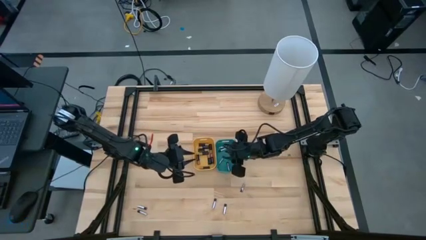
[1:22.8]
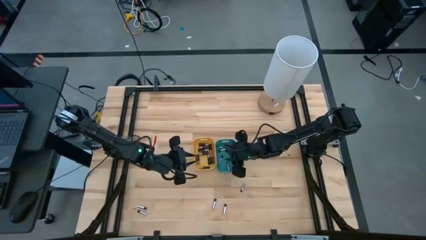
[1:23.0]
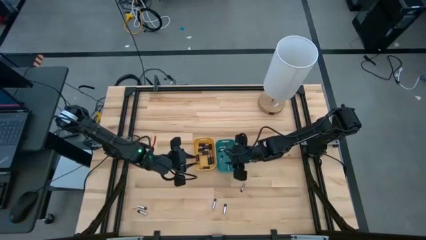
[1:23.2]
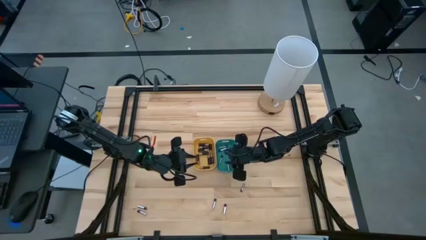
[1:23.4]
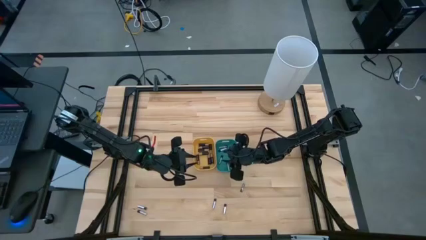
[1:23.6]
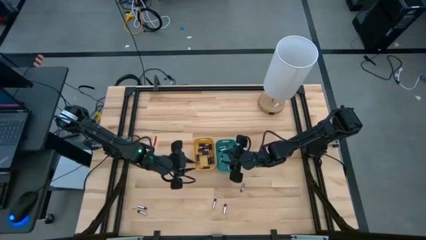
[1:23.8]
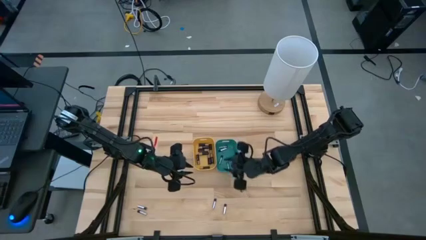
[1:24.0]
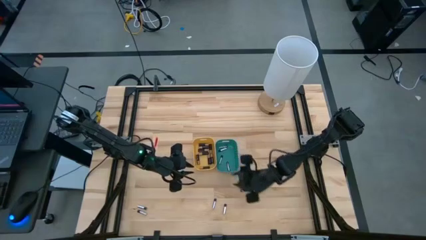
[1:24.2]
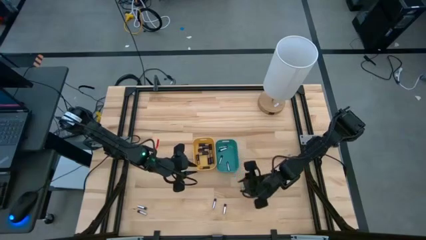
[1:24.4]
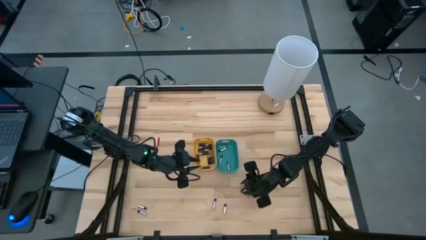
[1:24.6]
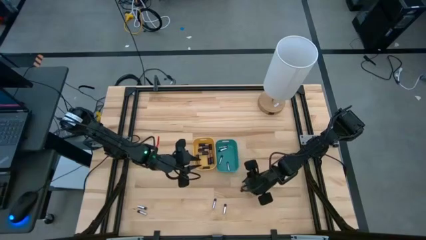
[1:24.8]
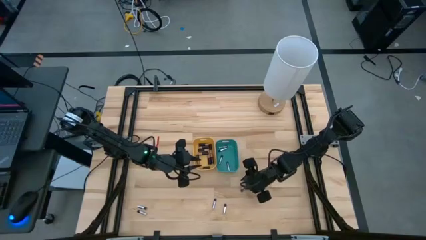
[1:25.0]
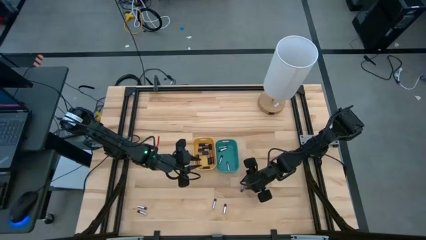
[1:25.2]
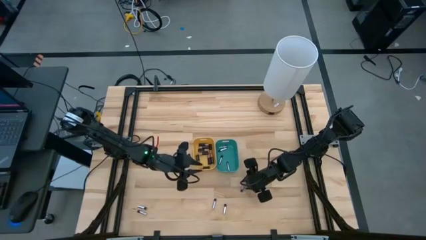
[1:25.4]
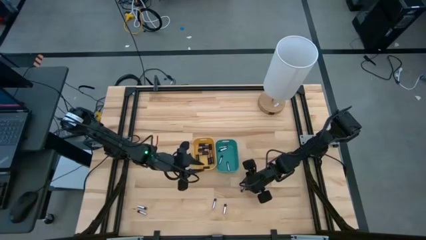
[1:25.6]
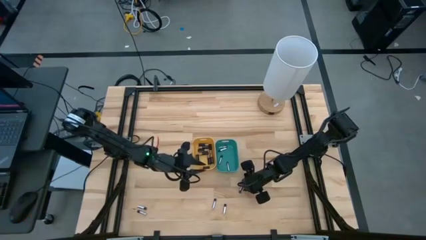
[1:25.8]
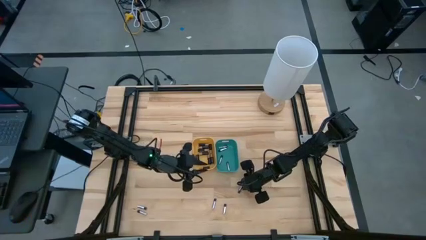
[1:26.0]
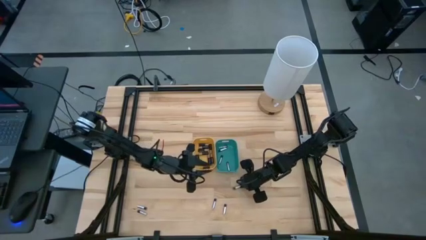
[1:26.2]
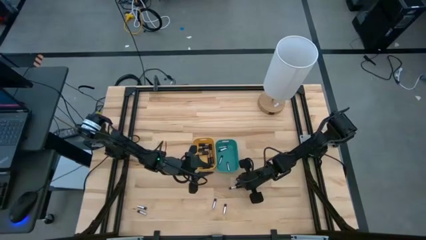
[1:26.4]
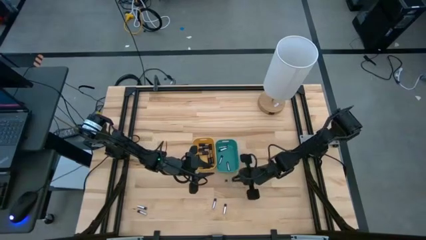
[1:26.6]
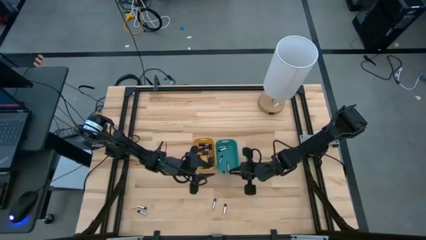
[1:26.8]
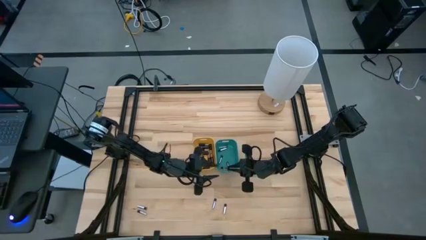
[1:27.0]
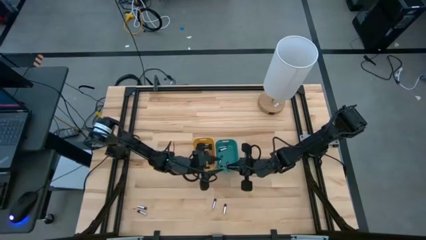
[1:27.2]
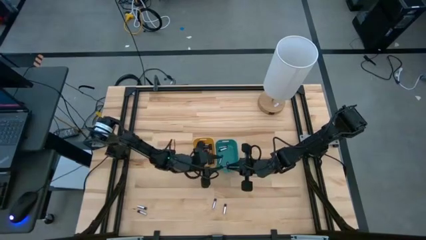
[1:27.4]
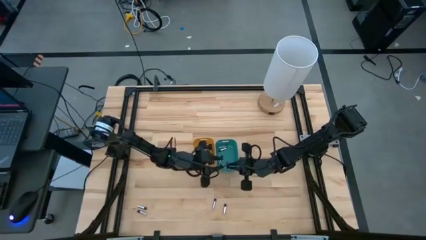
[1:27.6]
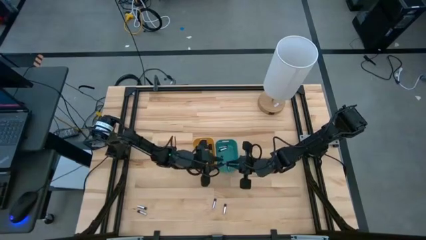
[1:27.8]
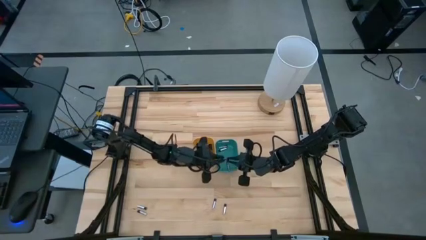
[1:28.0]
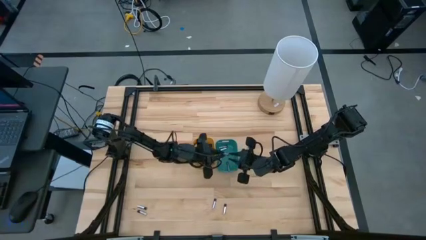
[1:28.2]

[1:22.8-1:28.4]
Task: Sort batteries
Put the silver battery into the green bin

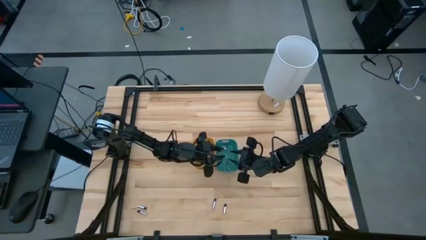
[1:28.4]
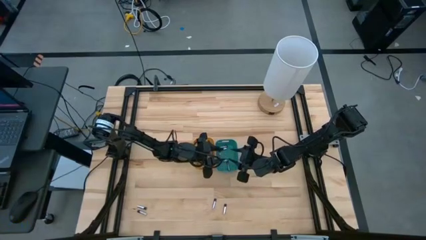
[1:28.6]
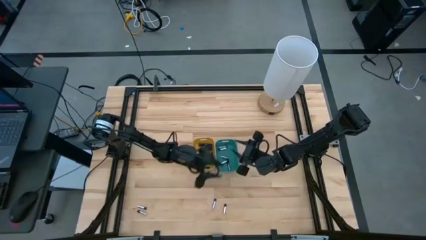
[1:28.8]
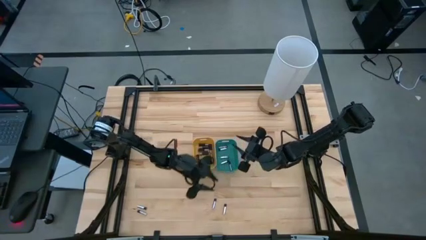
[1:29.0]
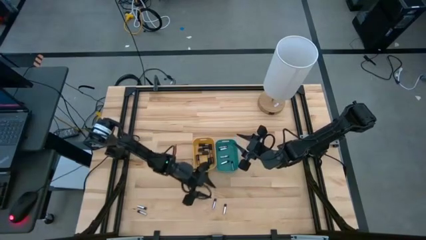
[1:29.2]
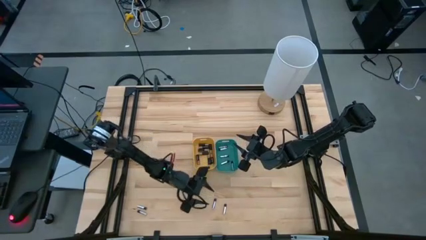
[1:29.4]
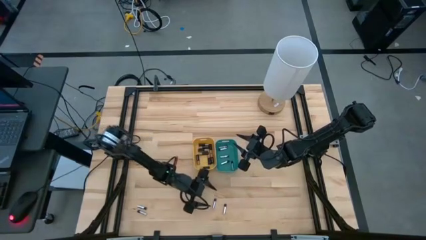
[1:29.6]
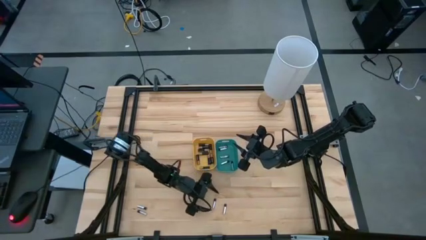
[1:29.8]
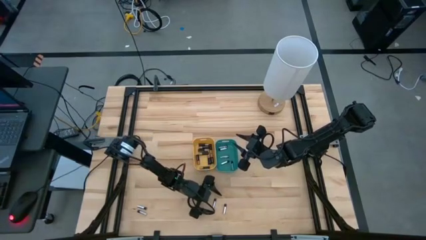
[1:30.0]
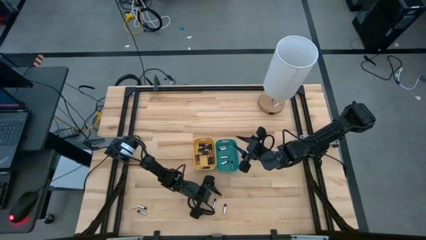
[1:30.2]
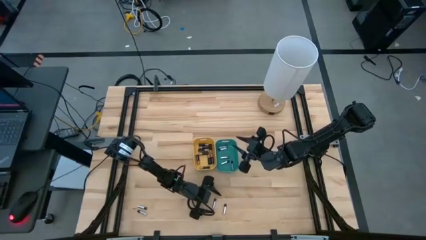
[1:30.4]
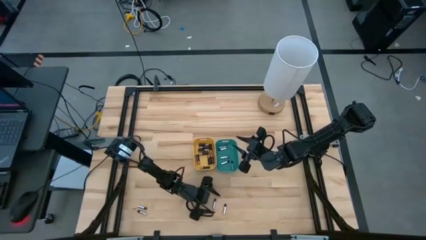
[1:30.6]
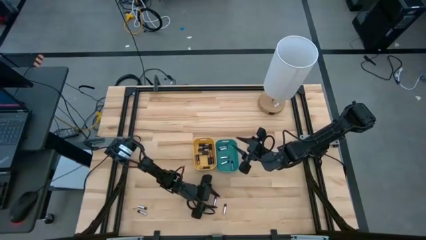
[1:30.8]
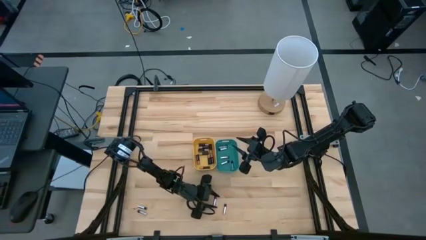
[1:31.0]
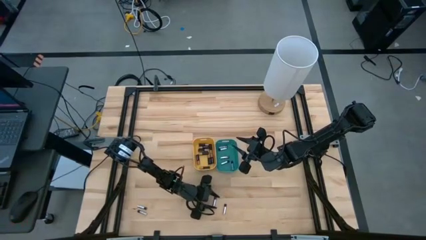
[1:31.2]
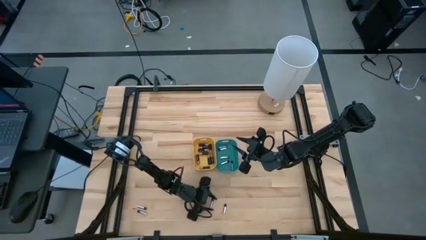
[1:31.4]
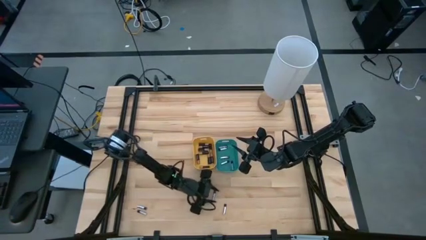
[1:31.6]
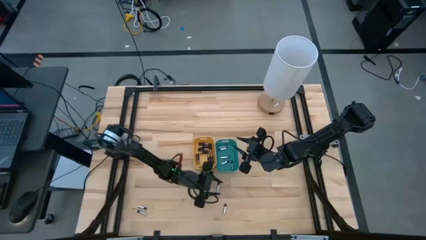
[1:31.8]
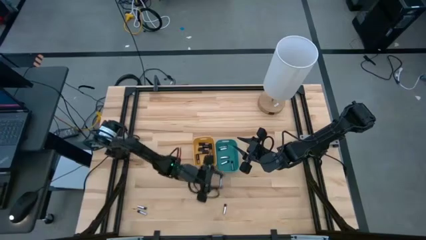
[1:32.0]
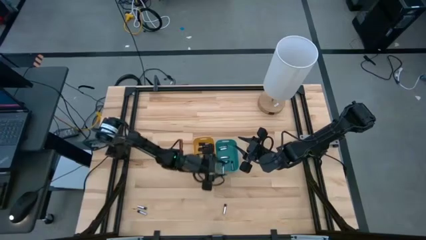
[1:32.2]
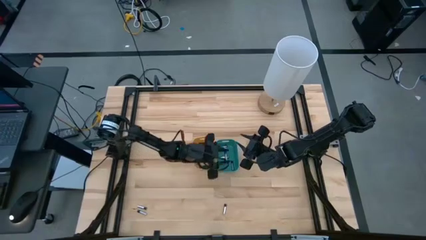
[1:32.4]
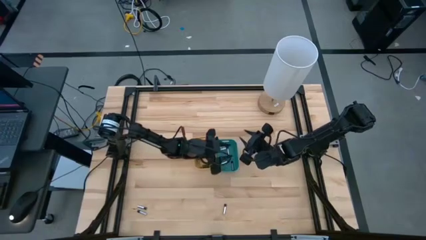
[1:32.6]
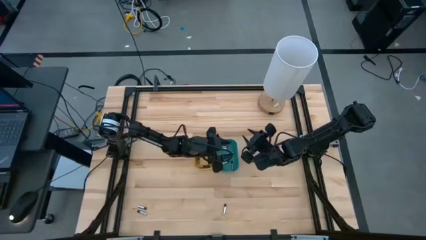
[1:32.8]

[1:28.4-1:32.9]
Put the silver battery into the green bin

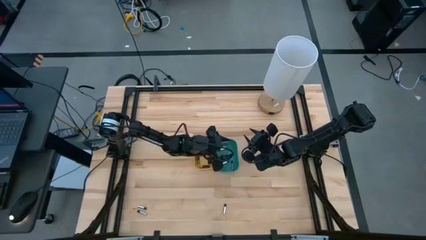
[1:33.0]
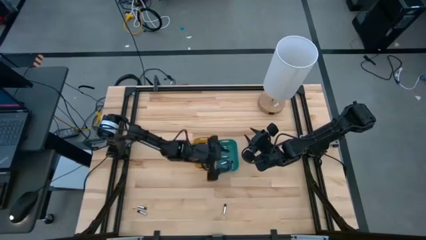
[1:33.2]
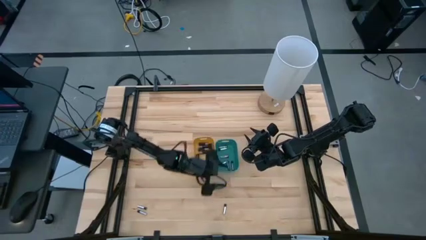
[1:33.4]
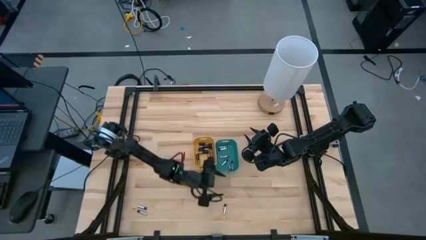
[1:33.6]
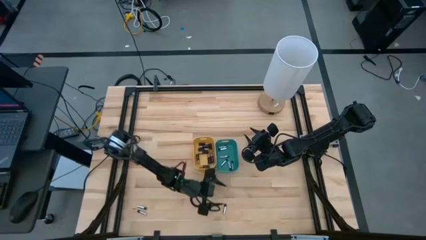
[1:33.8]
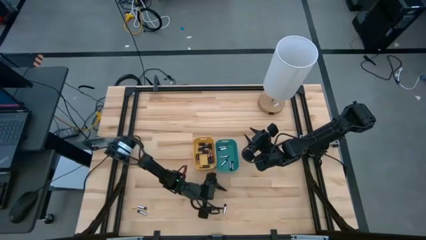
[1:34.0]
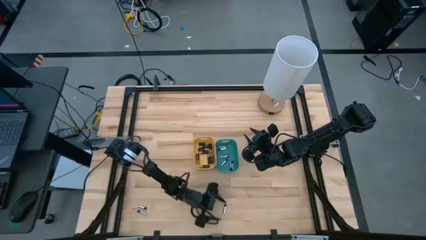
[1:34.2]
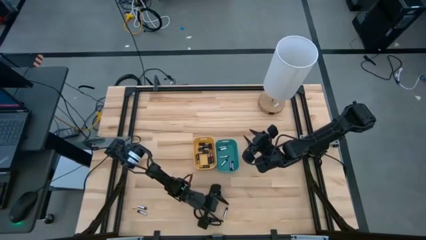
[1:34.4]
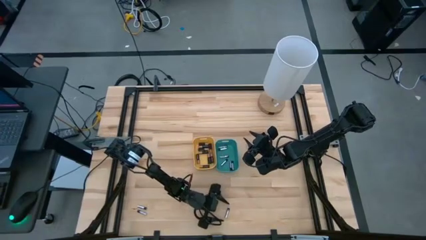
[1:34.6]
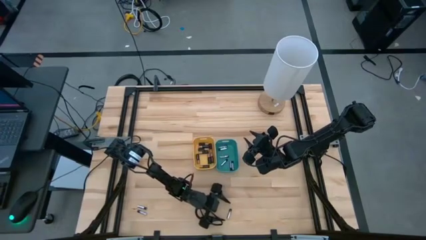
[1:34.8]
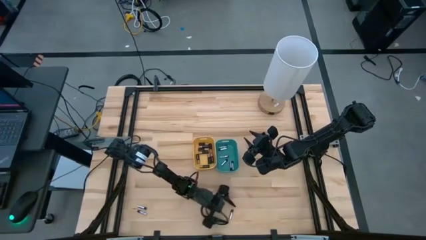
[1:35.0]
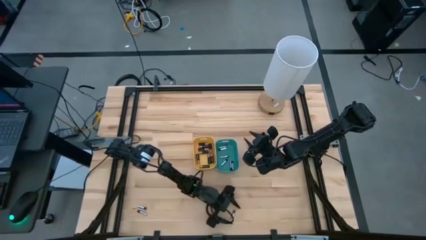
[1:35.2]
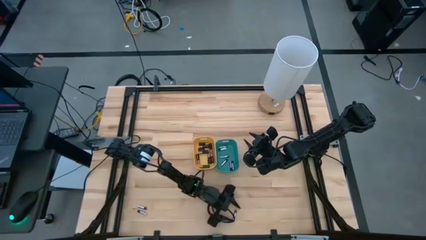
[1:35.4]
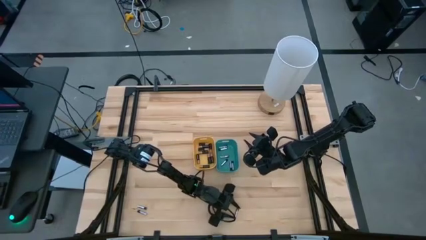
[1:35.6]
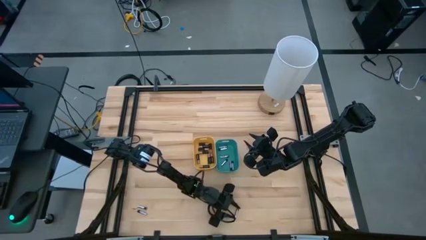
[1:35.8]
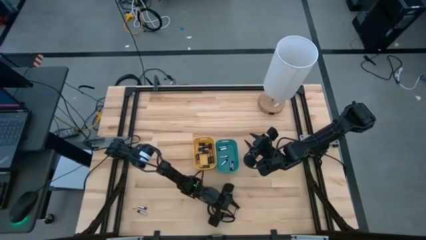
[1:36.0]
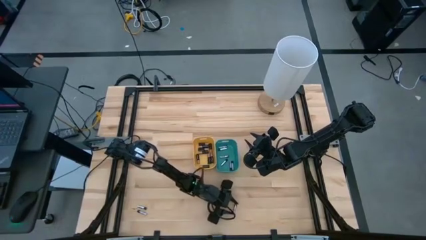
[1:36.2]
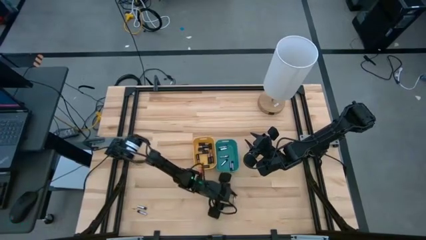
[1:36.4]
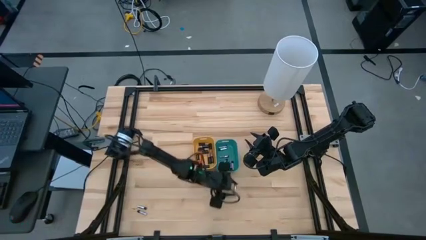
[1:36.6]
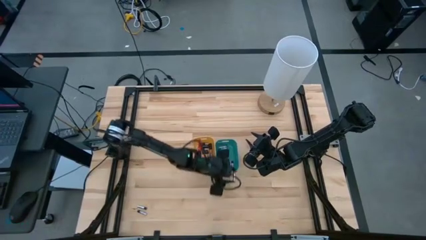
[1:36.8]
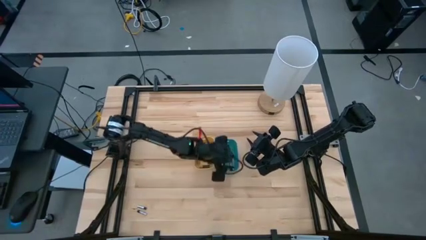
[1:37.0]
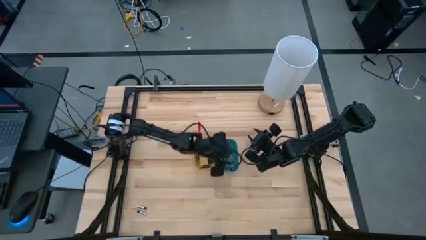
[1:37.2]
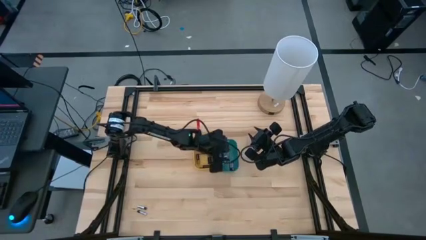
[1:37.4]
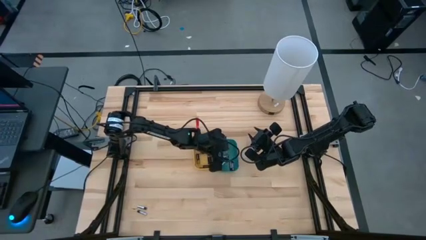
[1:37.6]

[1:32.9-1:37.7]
Put the silver battery into the green bin

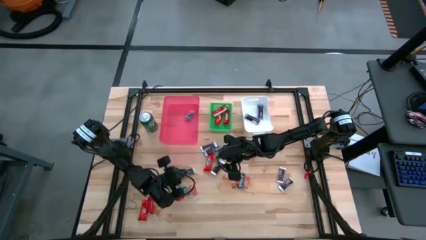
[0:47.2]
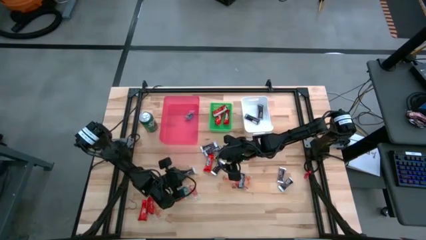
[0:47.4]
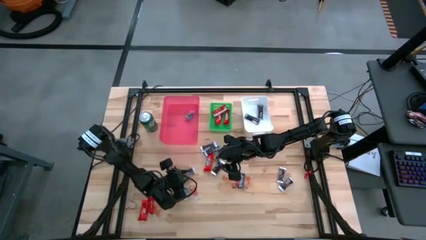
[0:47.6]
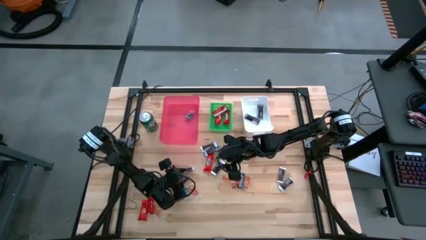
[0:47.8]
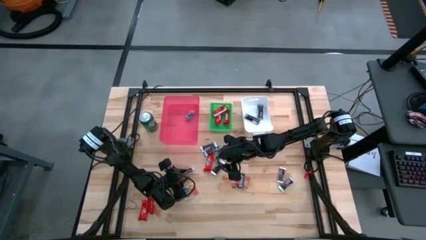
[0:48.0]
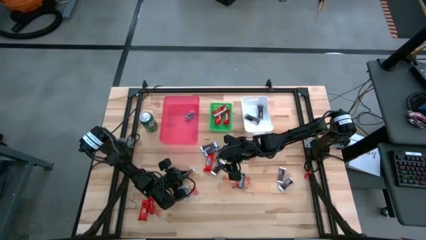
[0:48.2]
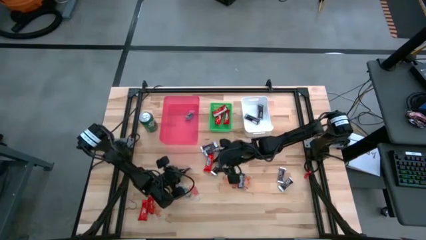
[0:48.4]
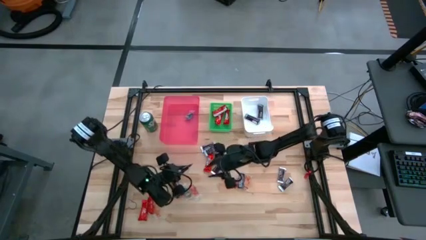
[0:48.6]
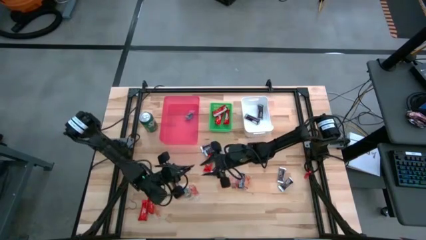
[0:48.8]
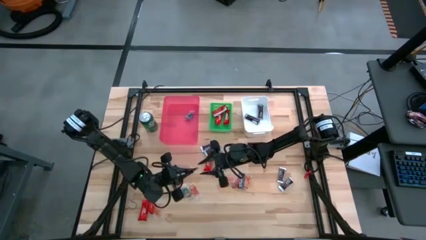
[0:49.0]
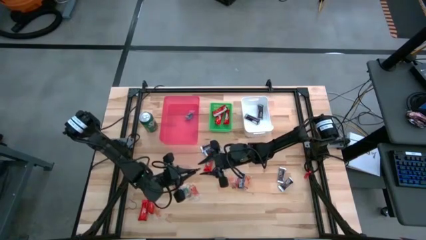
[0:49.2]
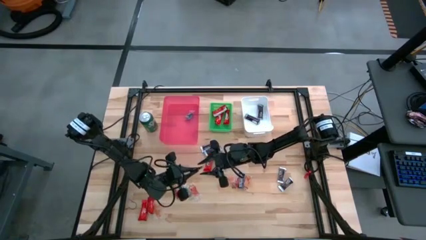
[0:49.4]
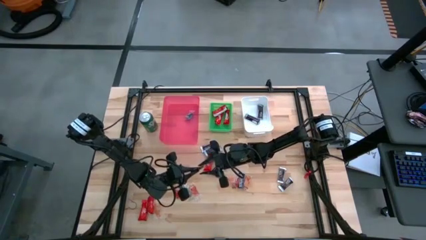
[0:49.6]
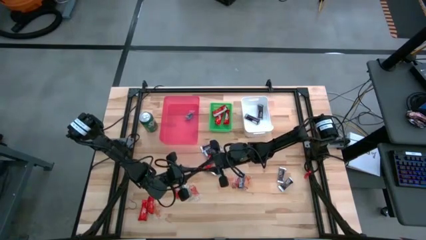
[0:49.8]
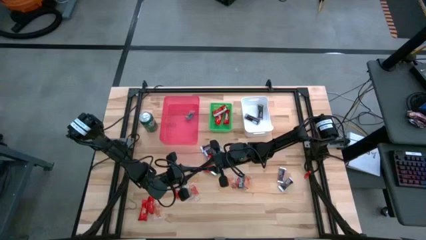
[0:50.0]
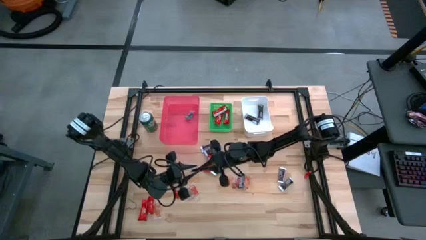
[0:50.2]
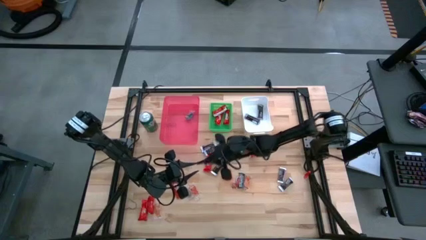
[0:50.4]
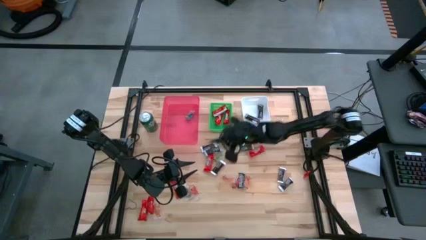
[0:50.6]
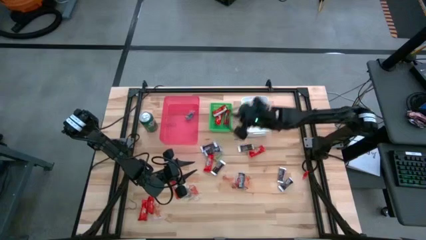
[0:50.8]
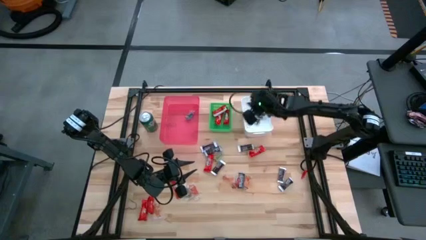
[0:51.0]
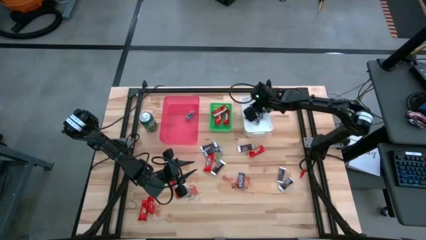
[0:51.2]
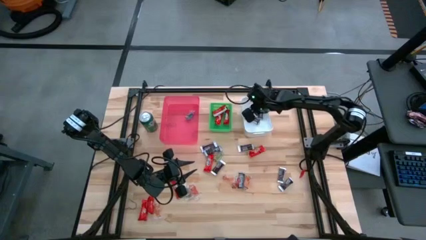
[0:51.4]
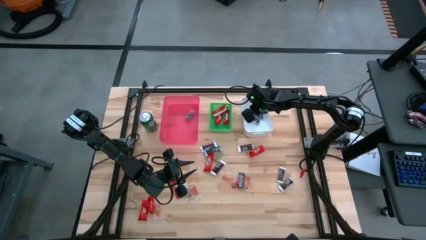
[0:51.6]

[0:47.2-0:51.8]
Task: Sort candy
Put the brown chocolate into the white bin
